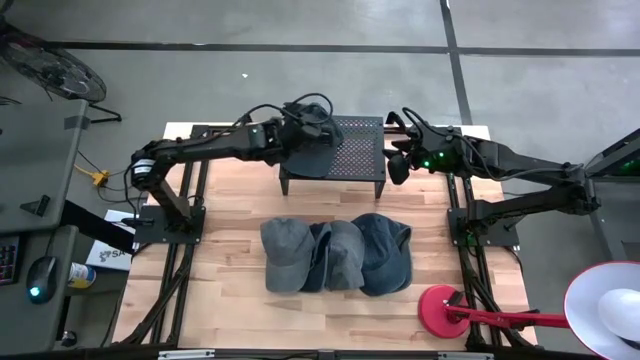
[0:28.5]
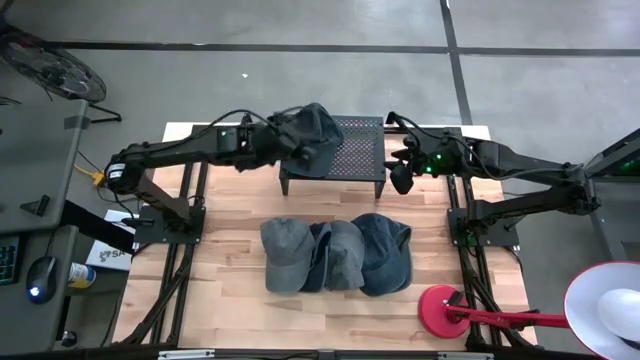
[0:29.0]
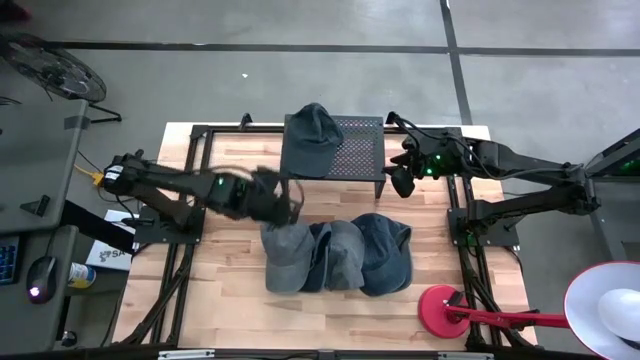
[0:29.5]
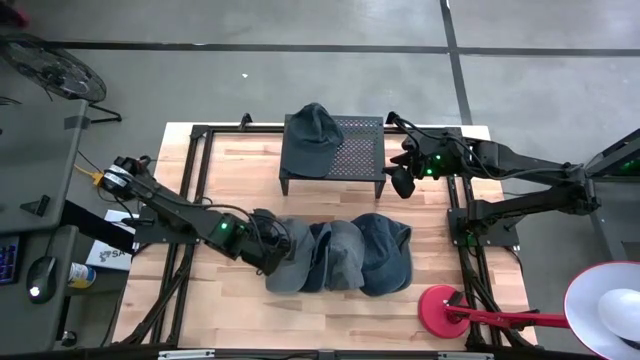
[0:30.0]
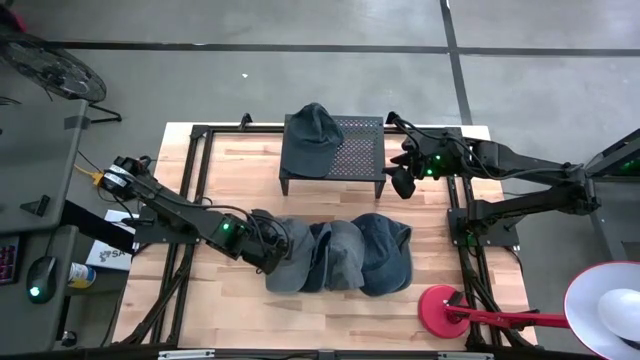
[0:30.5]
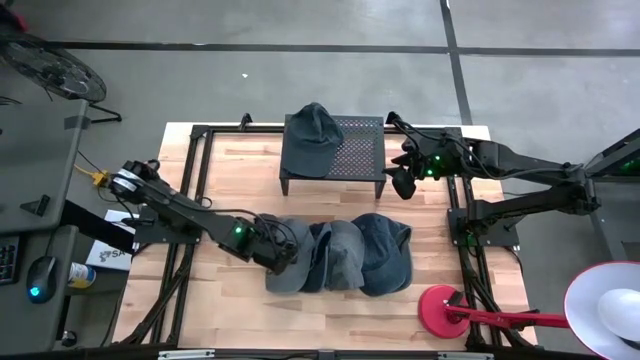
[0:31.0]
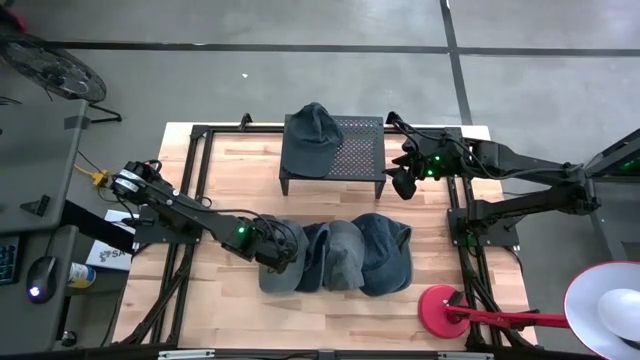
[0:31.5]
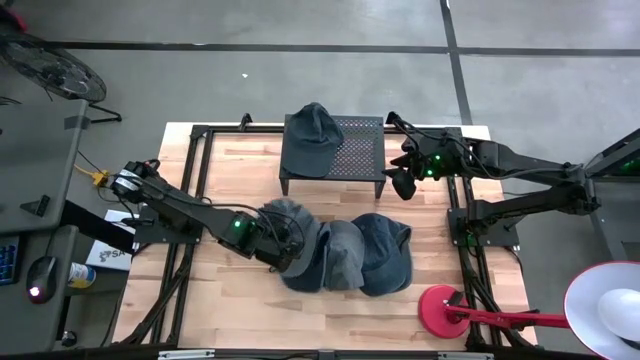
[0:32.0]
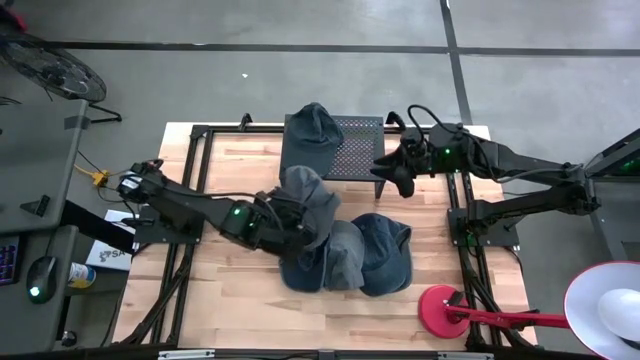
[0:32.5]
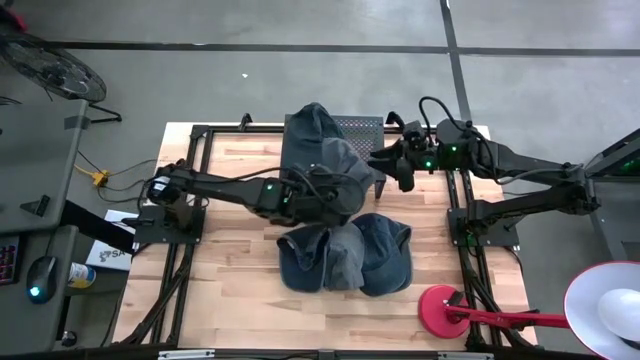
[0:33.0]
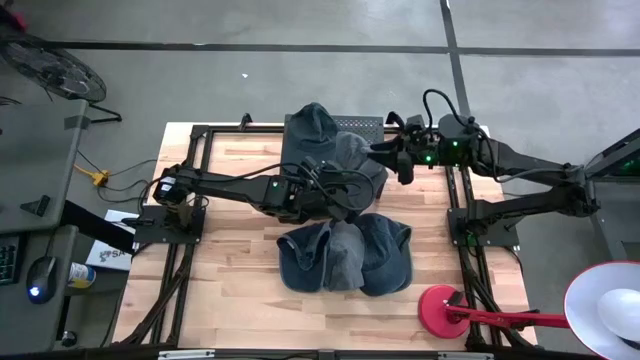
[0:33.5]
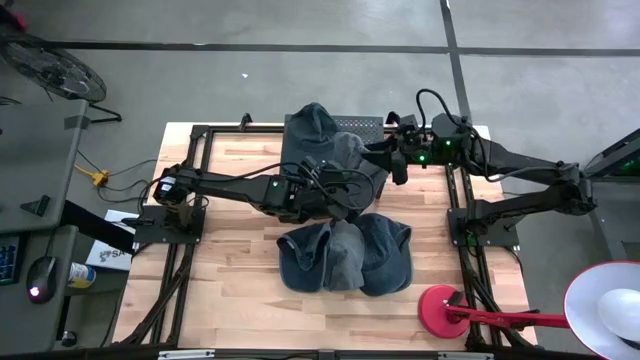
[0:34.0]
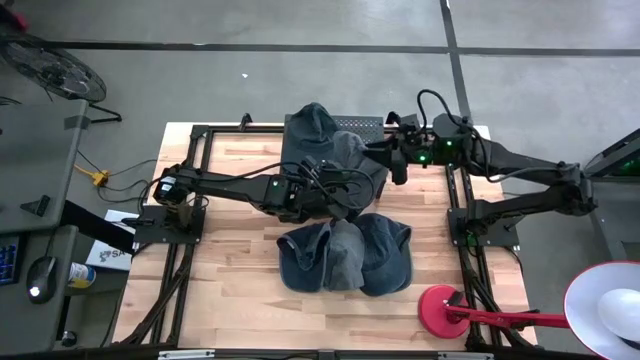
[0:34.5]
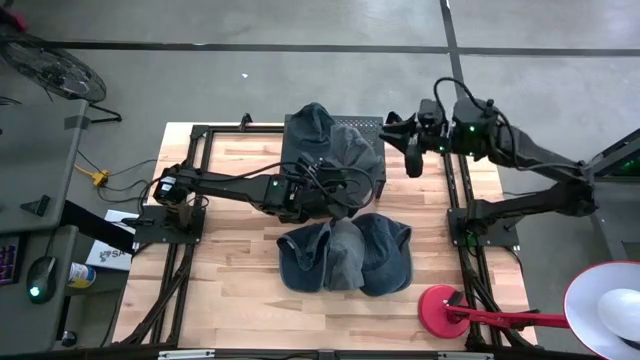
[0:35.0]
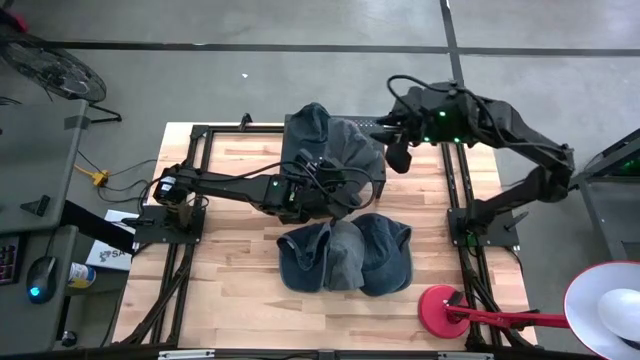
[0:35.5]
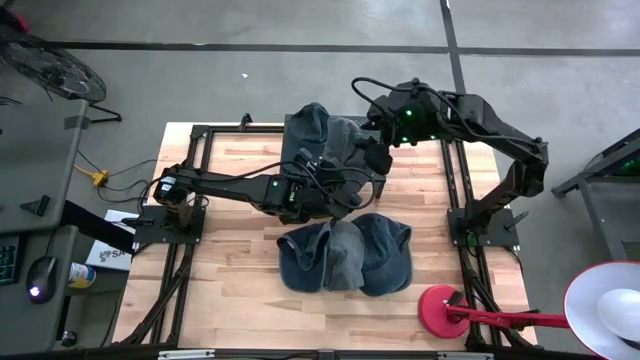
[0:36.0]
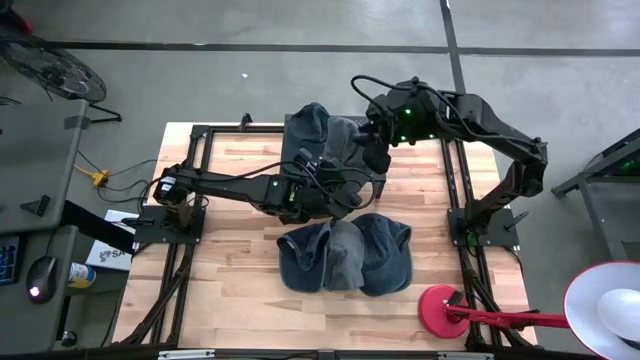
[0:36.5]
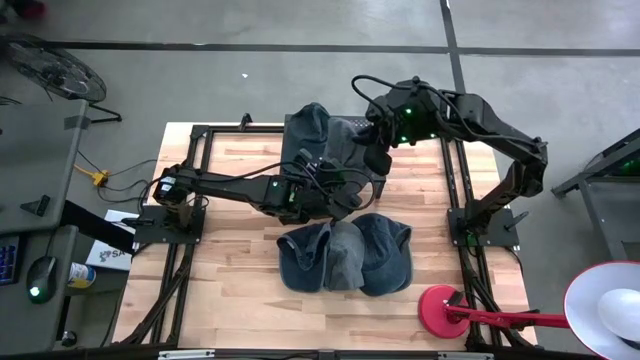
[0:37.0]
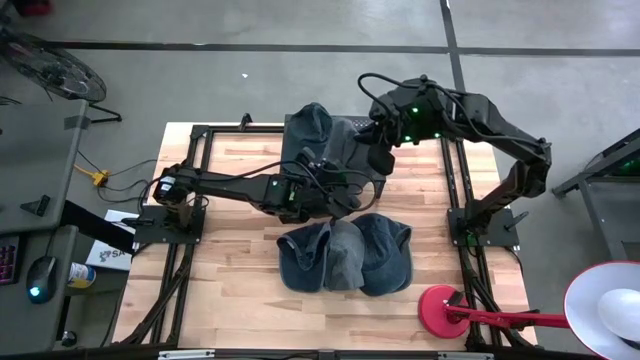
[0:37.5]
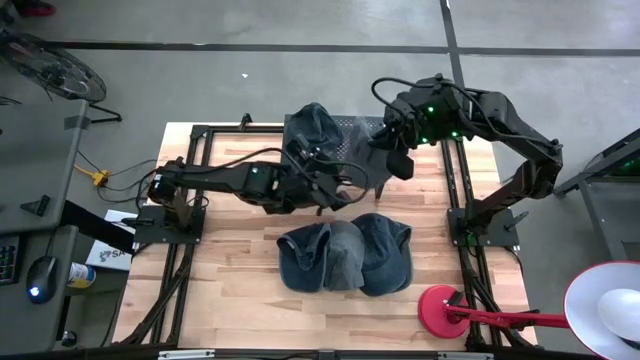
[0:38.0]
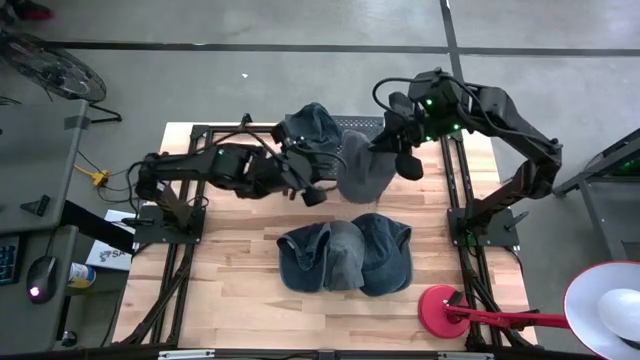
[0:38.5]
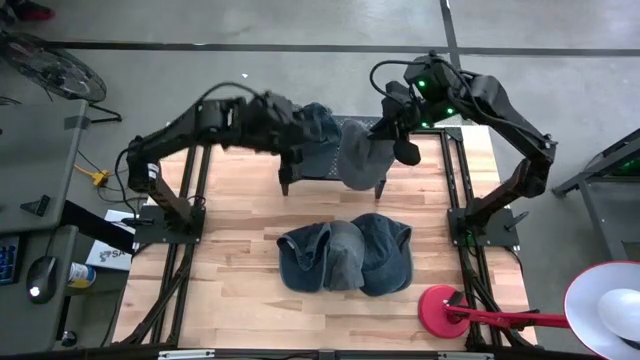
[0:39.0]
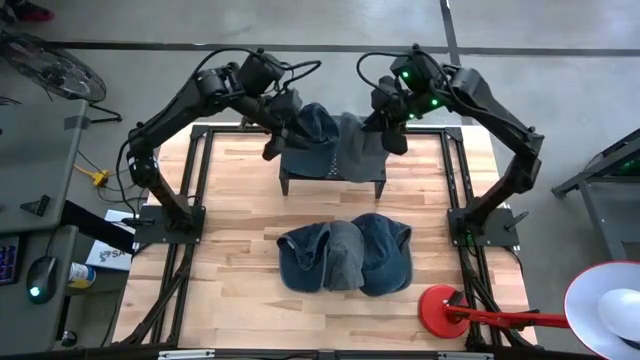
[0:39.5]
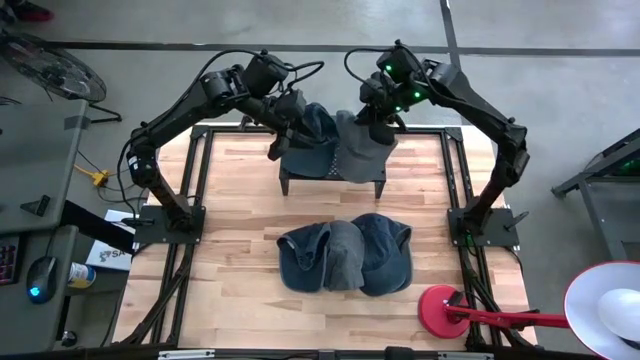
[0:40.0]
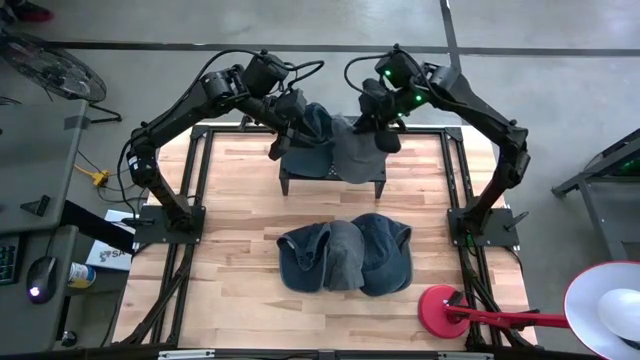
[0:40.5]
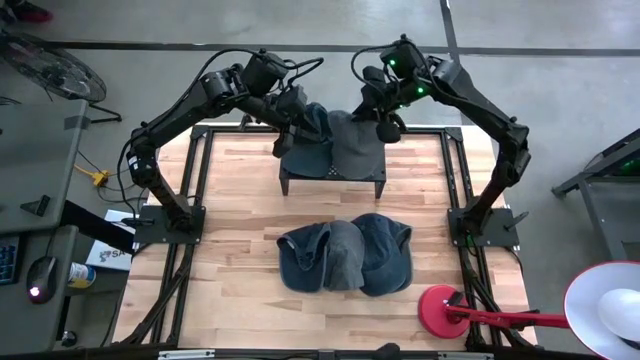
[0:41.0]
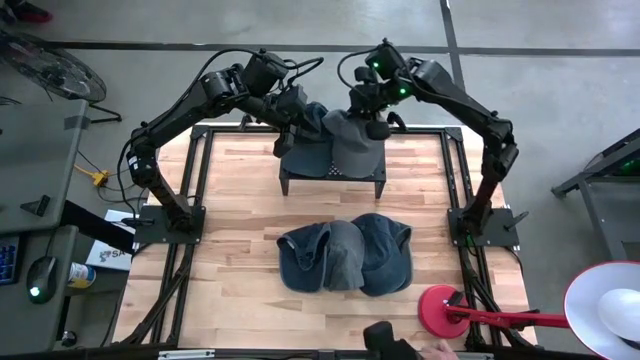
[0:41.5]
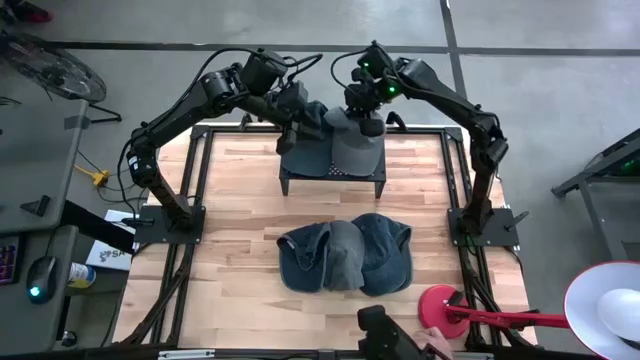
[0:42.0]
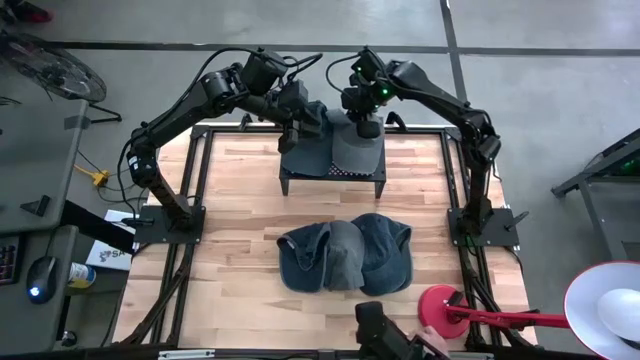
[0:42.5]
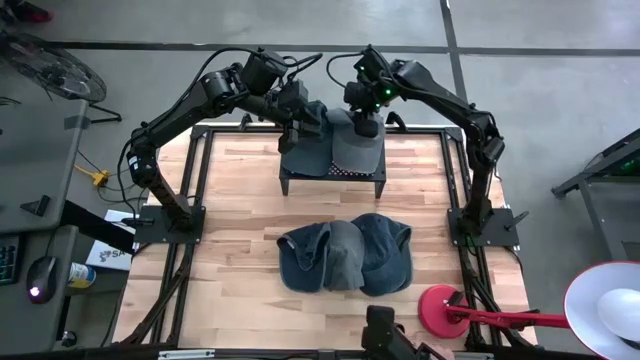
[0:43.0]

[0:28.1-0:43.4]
Task: Pick & Place hat
Put the left gray cap on the shelf

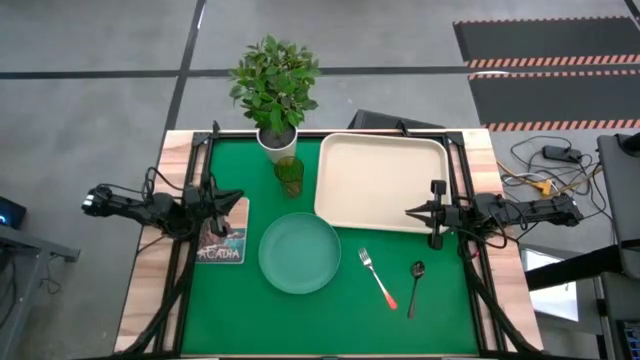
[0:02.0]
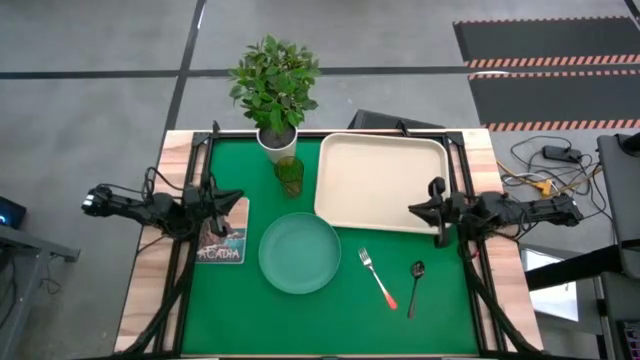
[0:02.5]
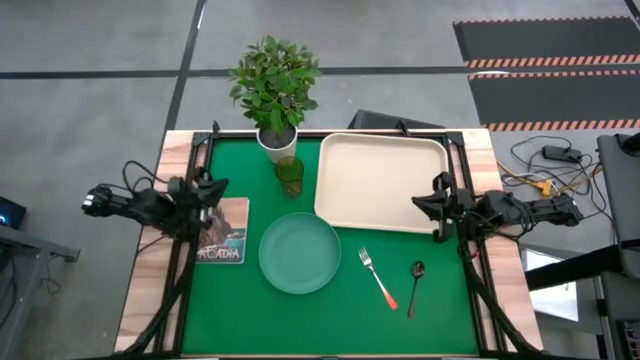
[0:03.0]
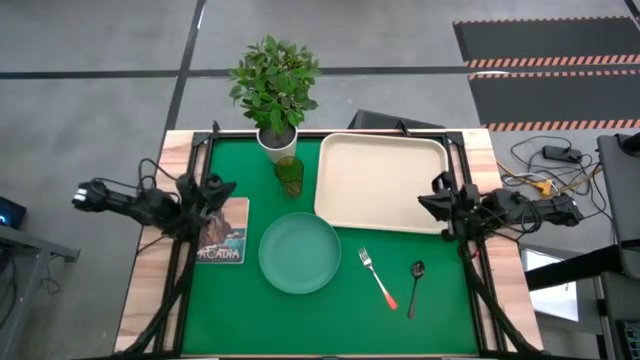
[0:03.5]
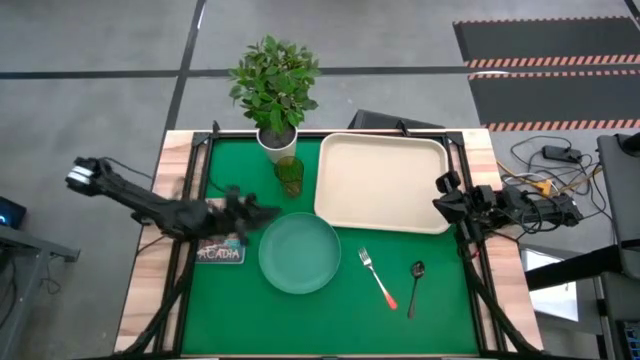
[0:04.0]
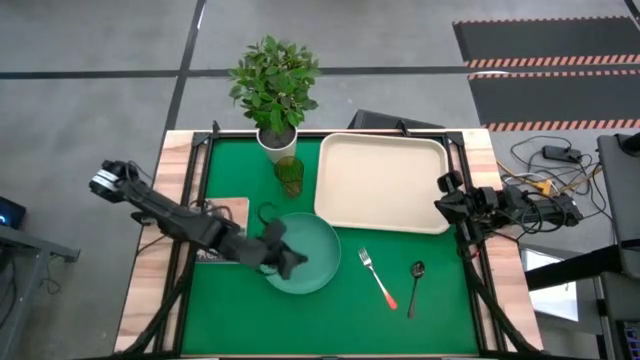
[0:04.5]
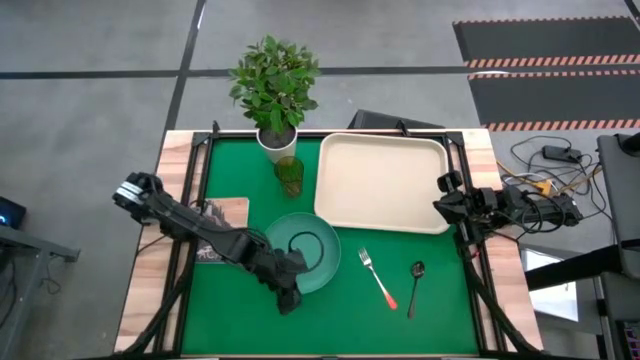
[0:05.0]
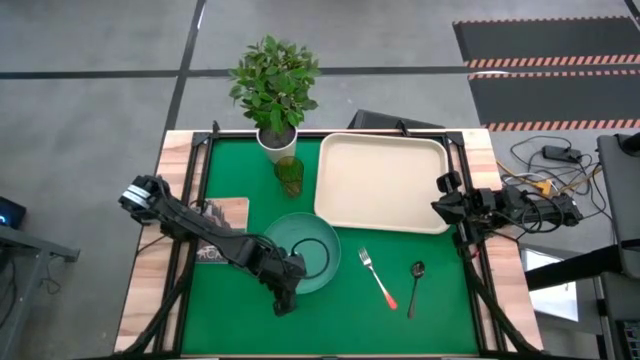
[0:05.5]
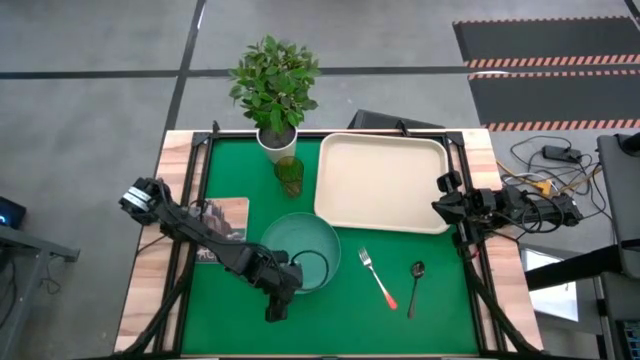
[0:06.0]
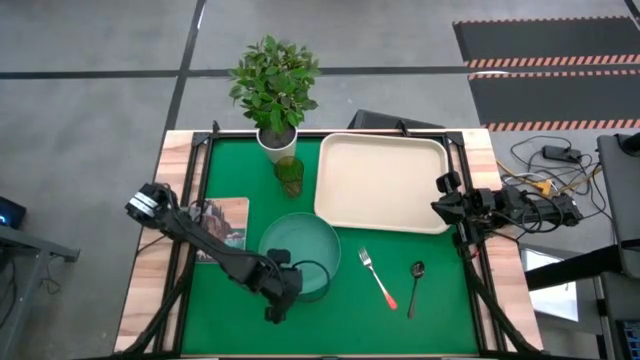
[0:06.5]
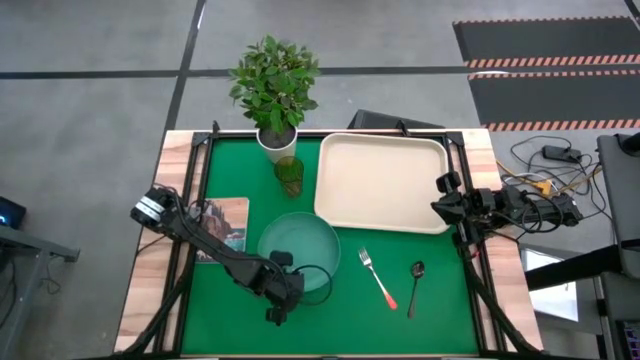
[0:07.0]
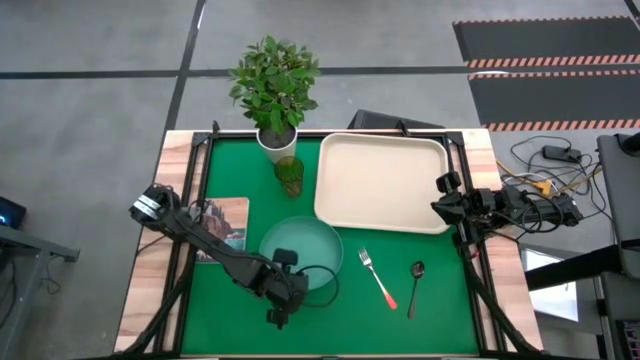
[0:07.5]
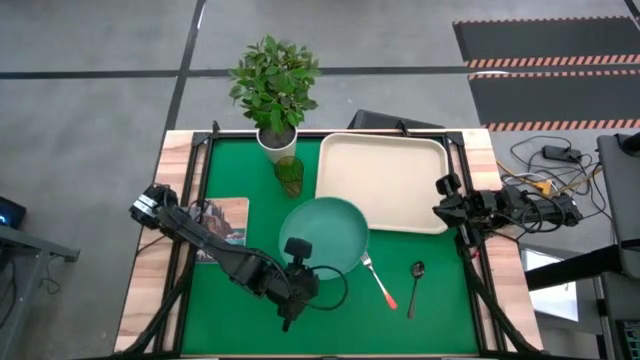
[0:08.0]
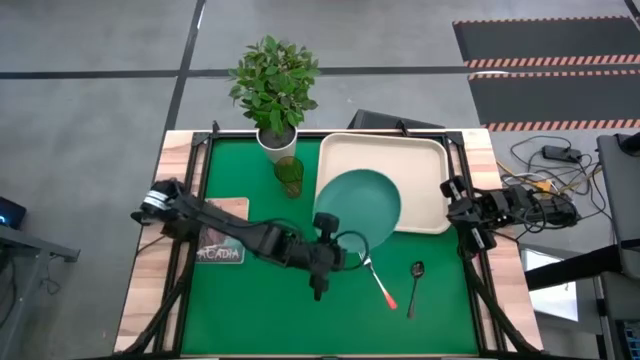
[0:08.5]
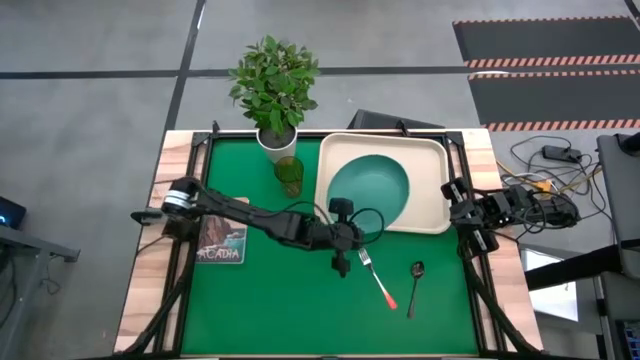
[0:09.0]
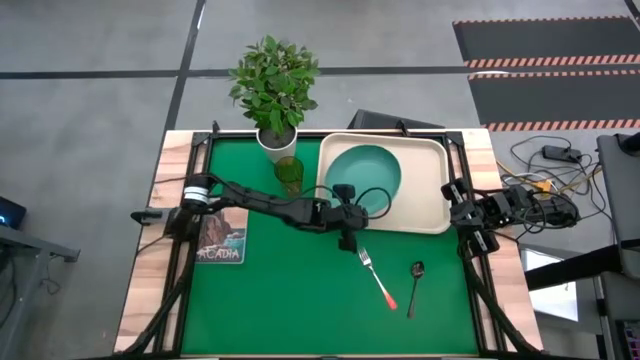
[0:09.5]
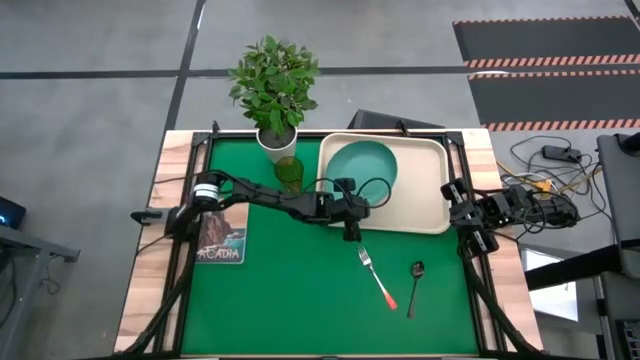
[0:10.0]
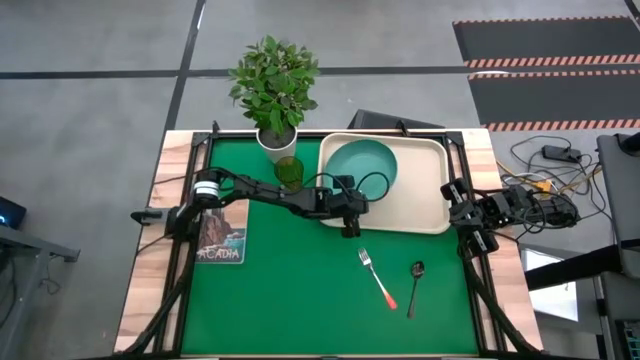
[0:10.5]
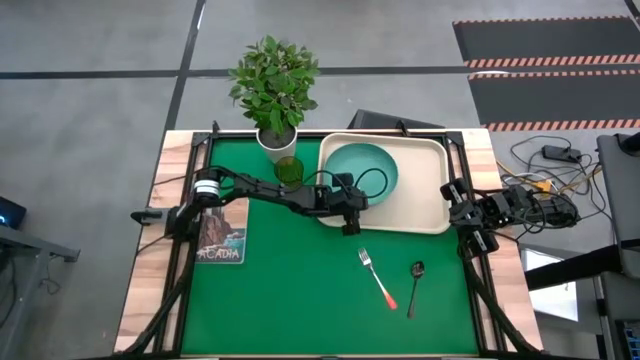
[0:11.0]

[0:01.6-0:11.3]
Task: Pick and place plate/cup/fork/spoon on tray
Put the green plate on the white tray
